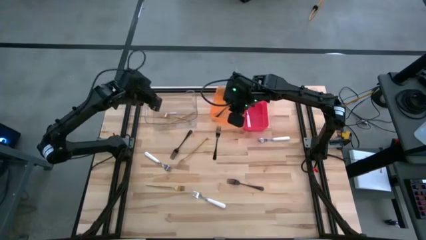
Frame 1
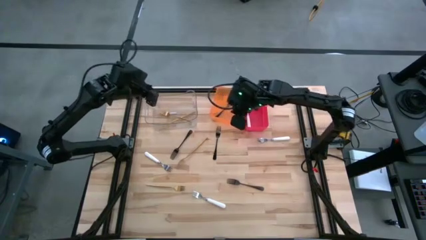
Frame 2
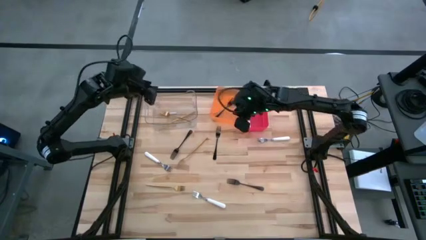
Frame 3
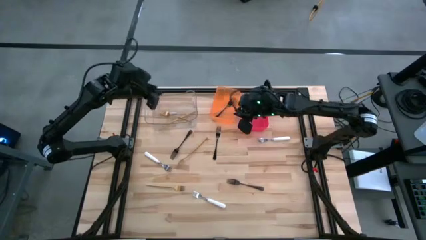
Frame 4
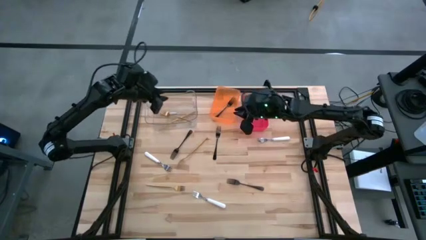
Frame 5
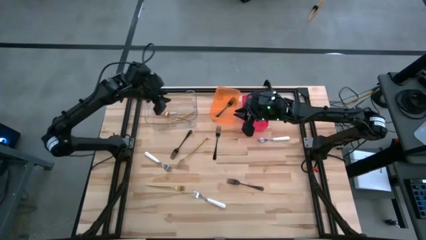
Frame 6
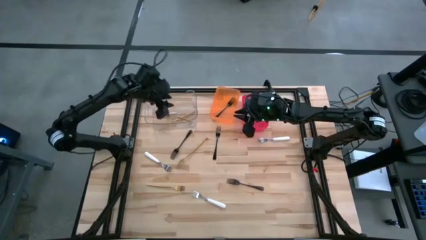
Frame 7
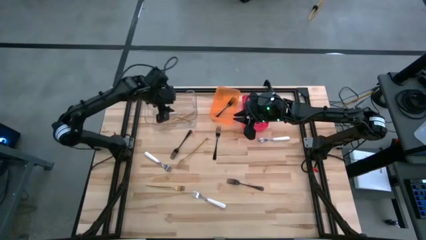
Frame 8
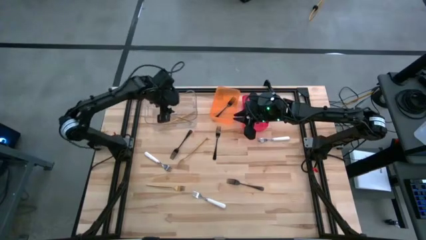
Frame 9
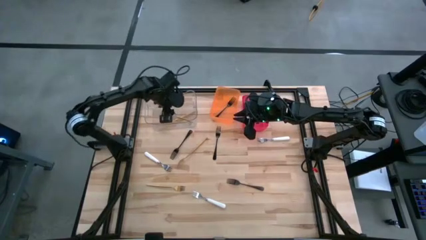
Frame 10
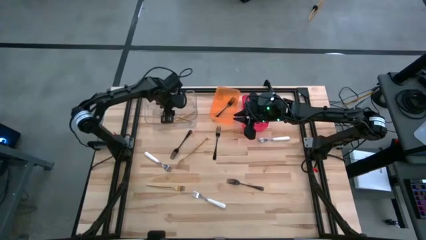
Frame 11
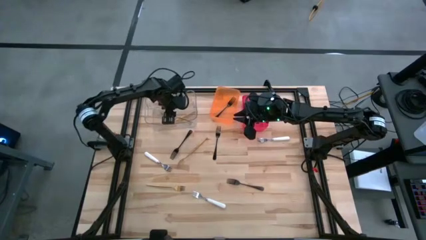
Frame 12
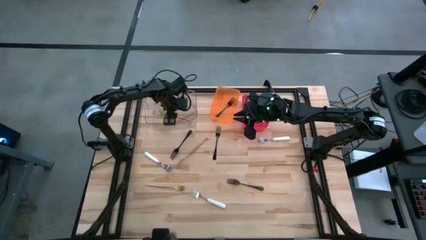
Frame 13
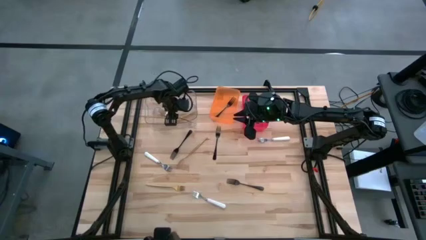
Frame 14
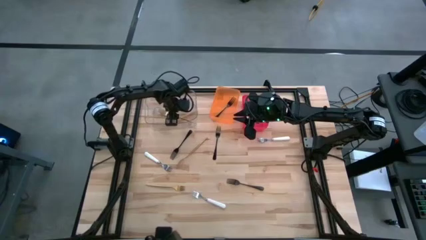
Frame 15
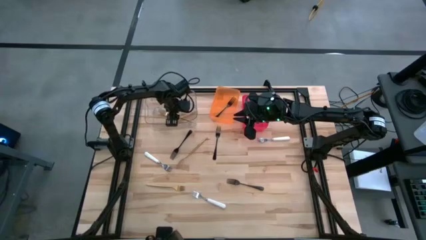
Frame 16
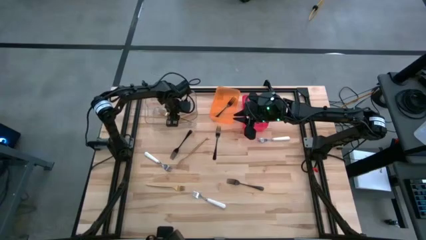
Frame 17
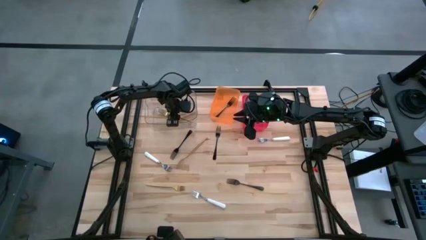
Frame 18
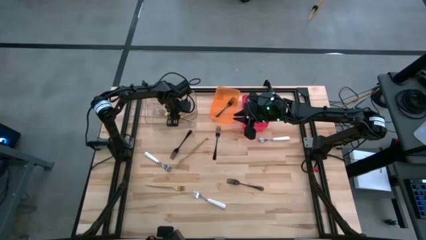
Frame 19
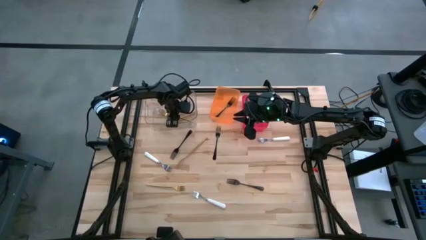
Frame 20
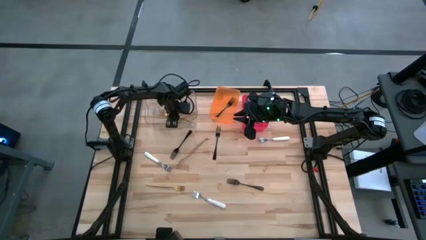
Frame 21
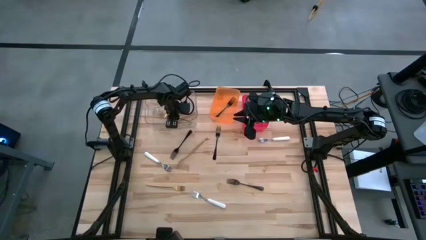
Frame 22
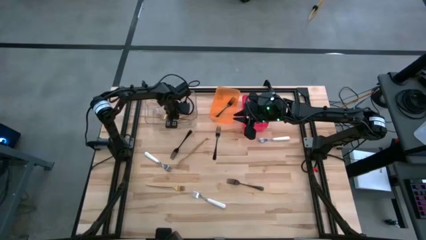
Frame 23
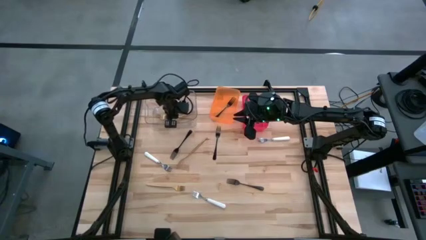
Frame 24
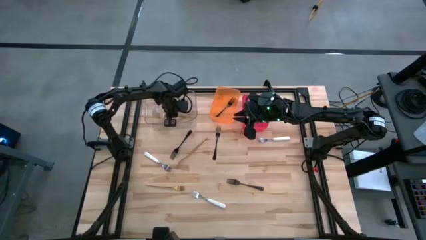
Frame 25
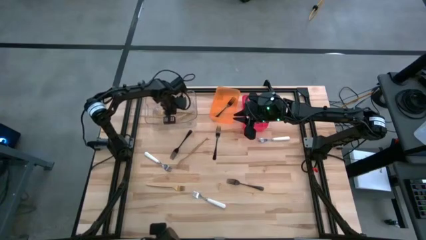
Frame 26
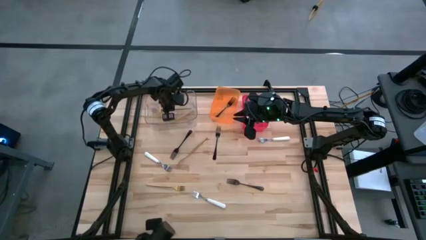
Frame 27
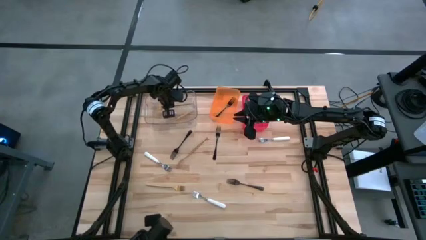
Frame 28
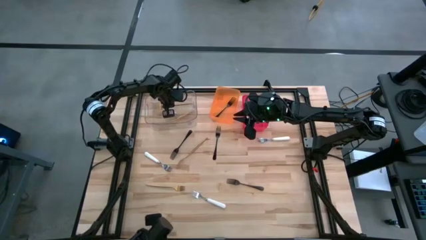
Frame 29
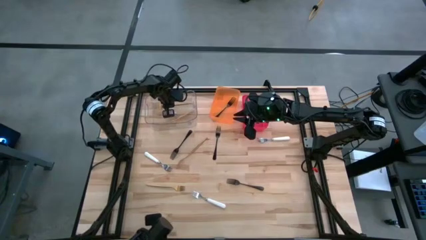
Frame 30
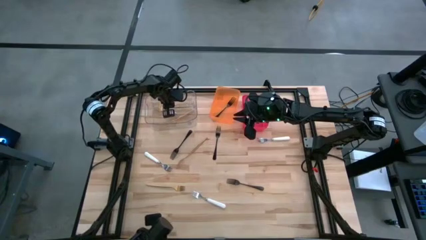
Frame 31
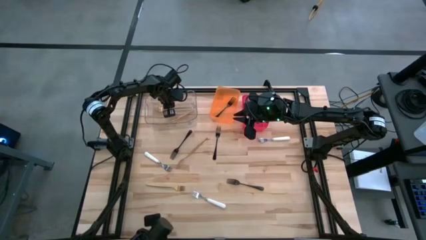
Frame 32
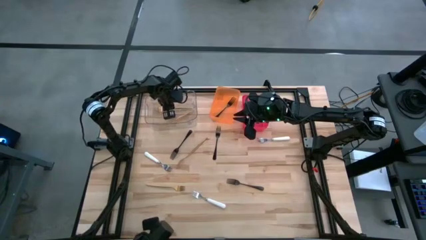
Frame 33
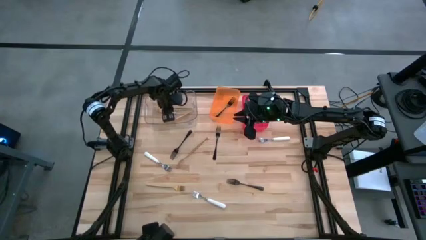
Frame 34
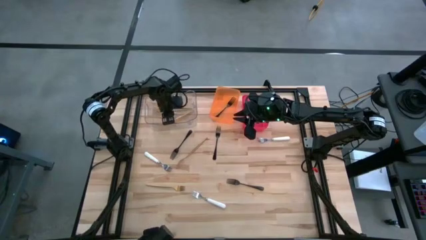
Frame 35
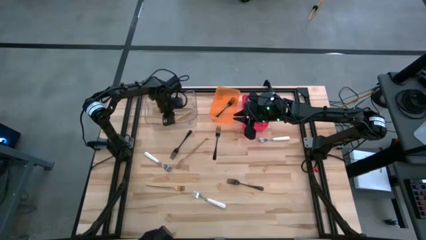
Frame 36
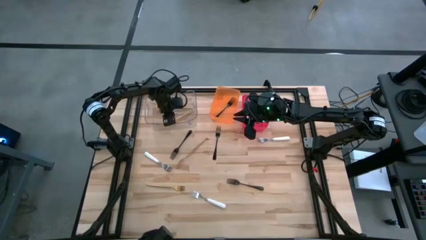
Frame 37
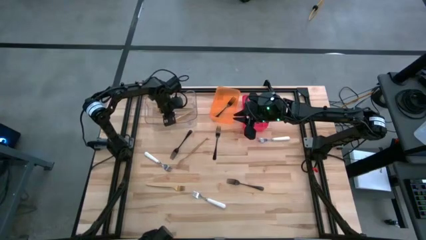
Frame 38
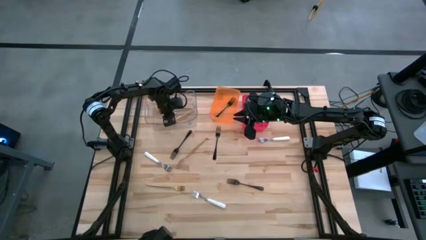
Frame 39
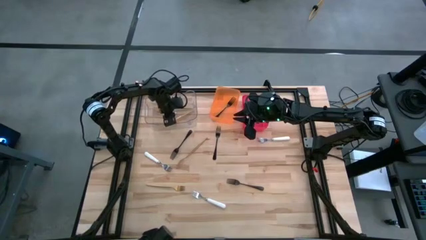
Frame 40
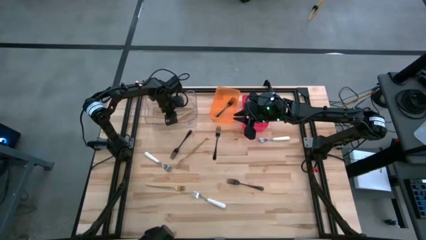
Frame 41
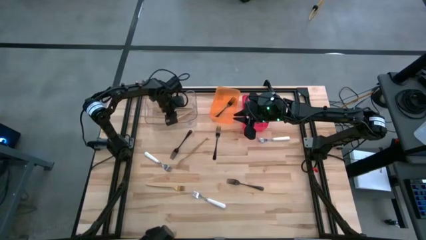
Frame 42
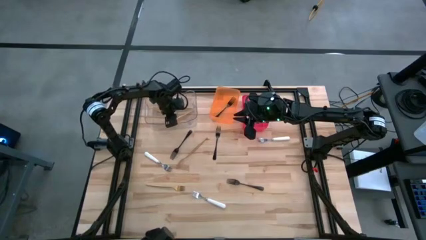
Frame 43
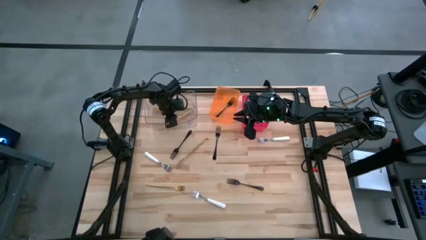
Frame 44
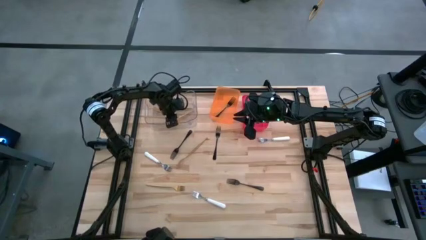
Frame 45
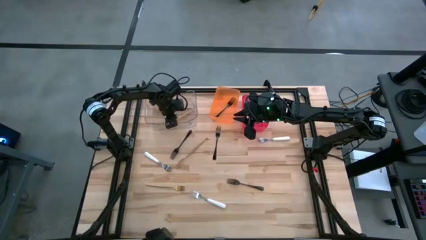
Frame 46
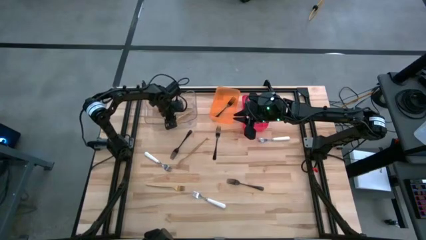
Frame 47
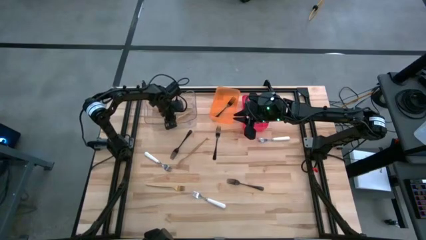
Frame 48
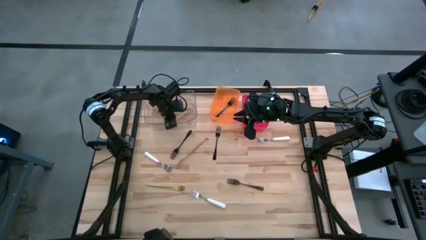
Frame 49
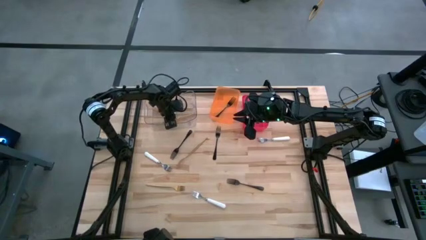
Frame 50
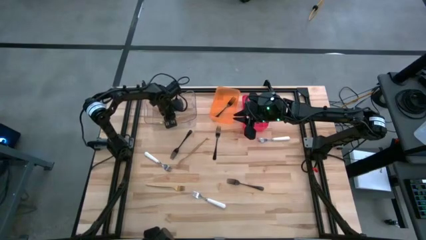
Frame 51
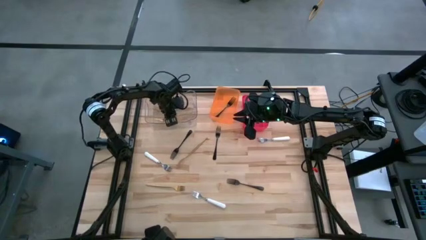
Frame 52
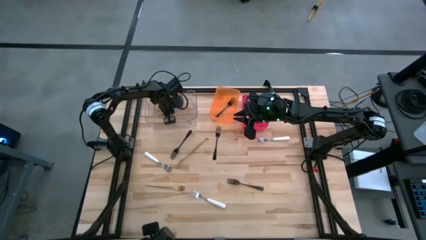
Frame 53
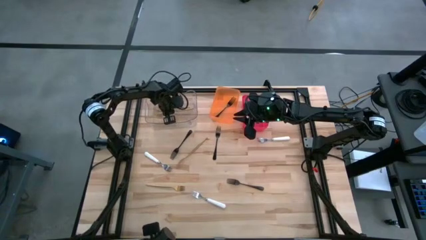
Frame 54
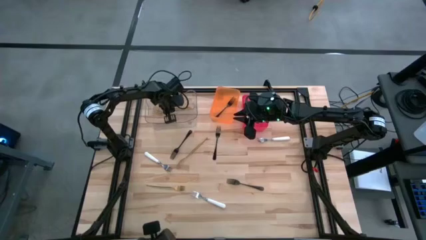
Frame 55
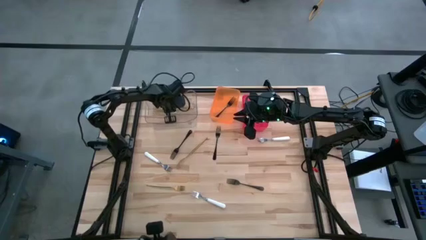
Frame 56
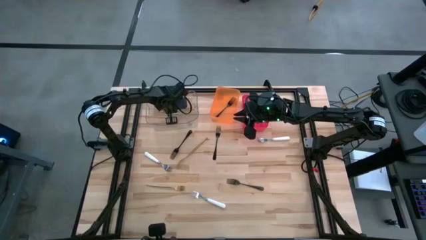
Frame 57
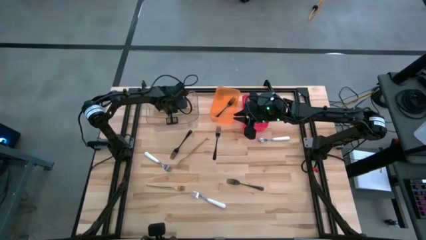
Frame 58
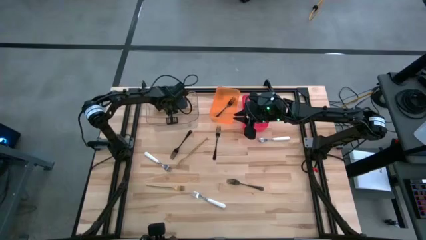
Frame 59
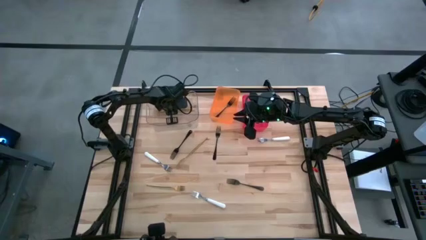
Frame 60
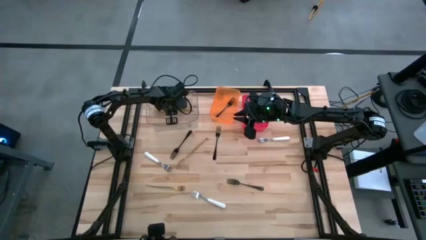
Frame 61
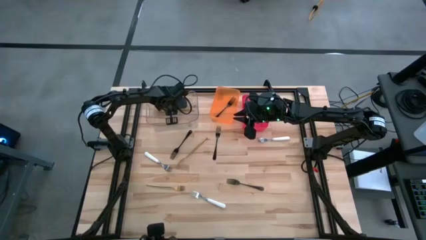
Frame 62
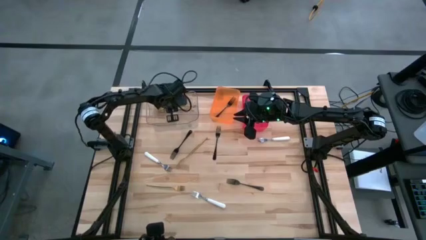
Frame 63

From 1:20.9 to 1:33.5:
Task: Sort silverware by color (type)
Adjust the gold fork in the transparent bin
